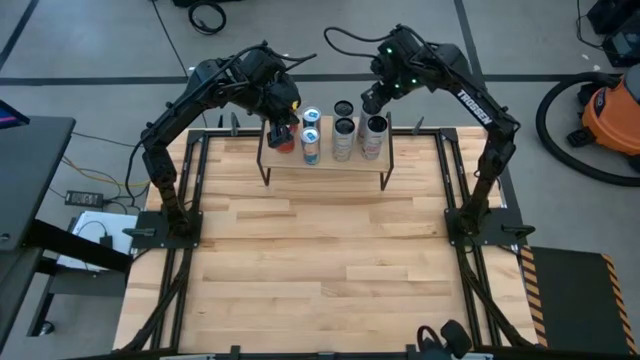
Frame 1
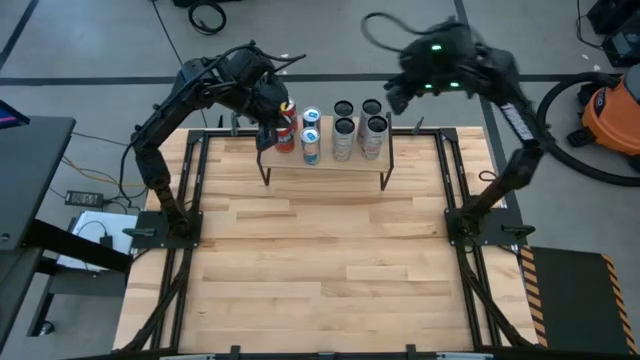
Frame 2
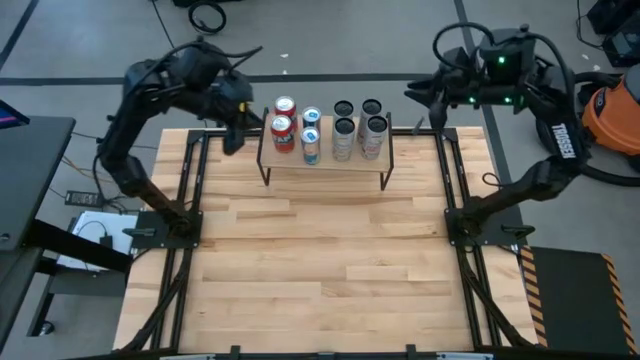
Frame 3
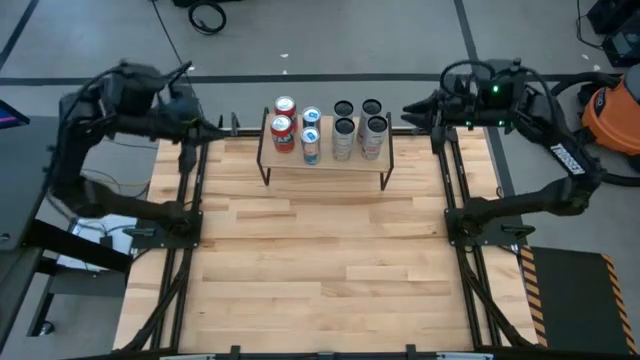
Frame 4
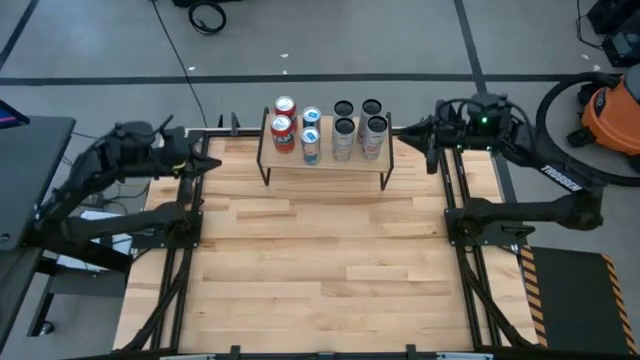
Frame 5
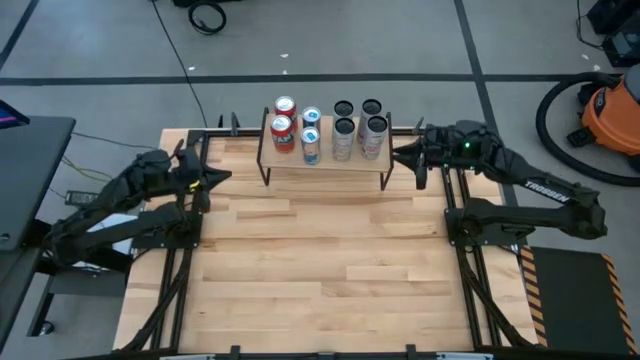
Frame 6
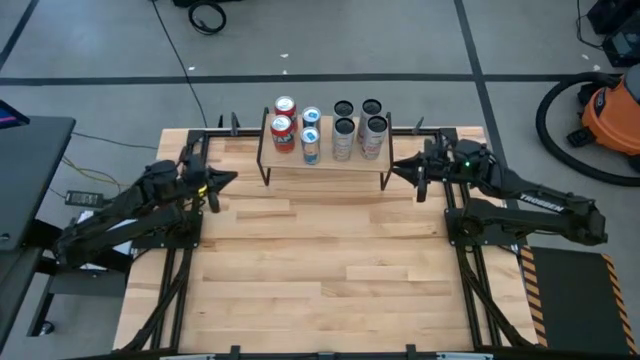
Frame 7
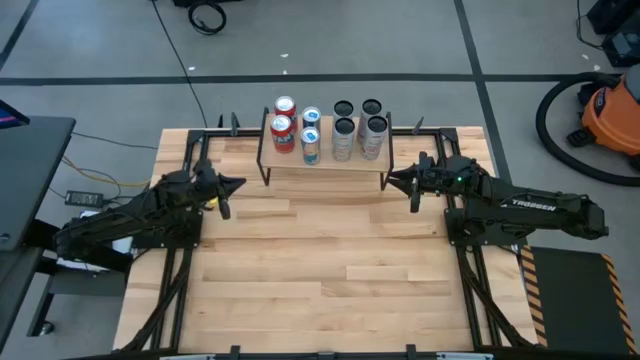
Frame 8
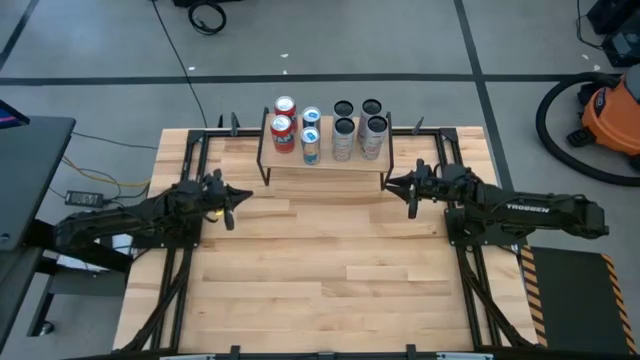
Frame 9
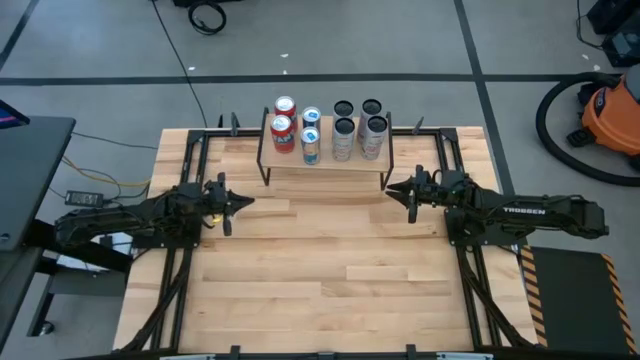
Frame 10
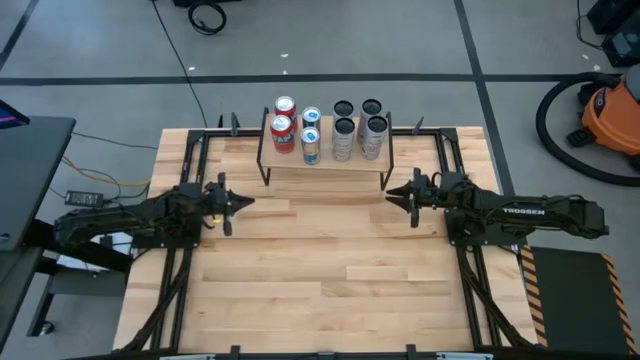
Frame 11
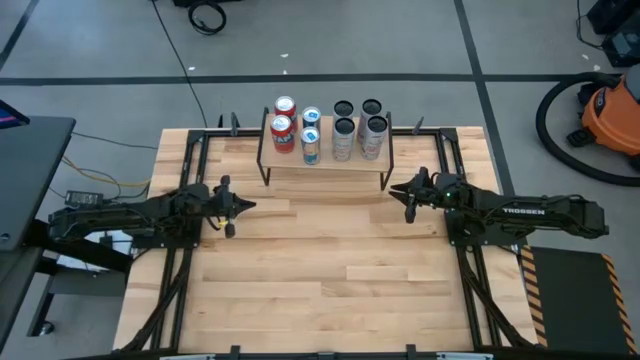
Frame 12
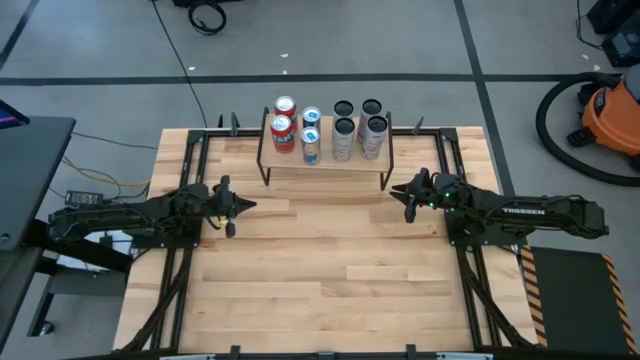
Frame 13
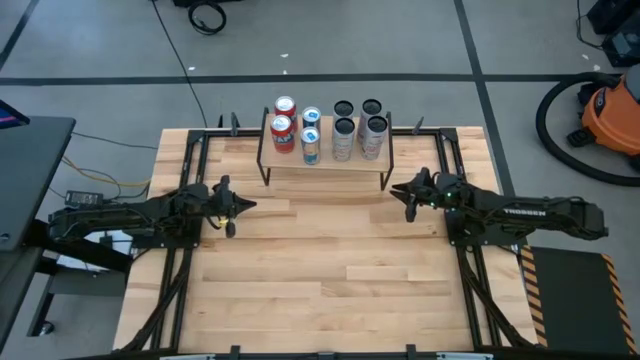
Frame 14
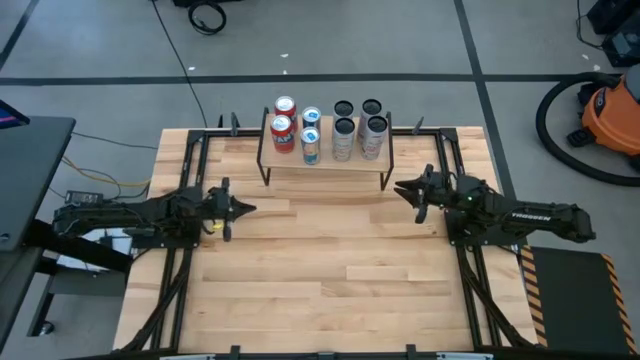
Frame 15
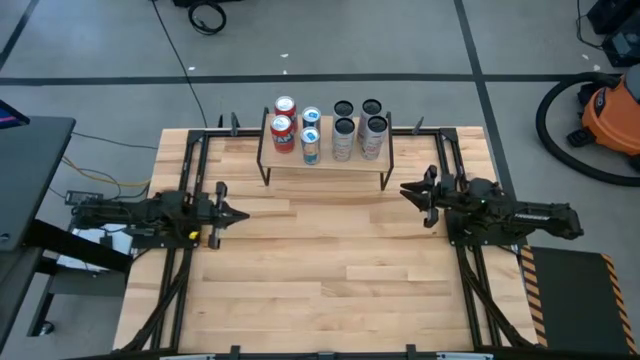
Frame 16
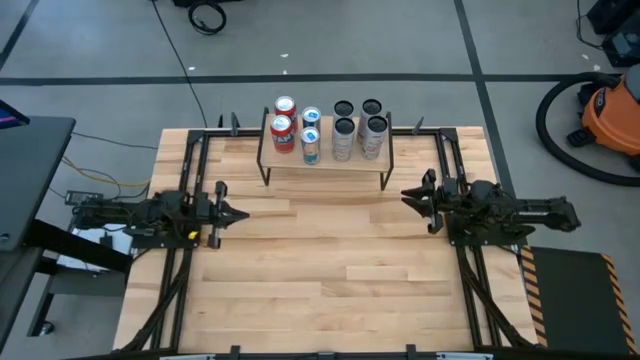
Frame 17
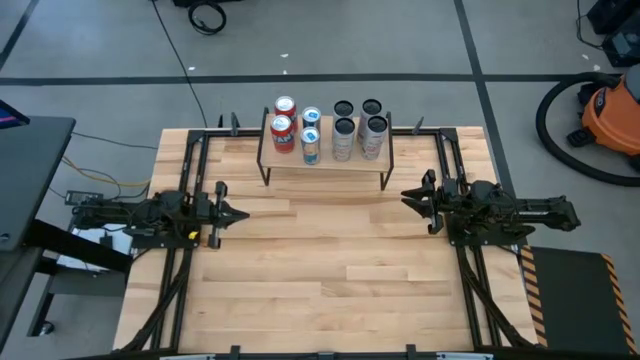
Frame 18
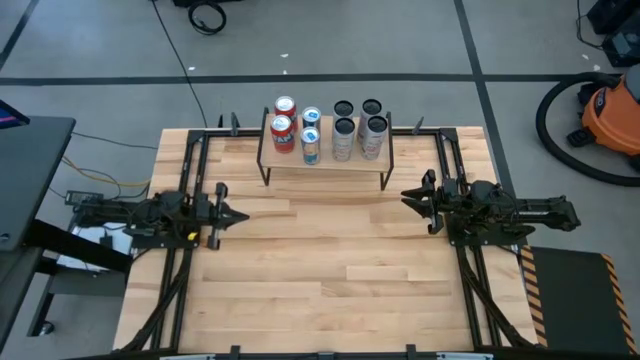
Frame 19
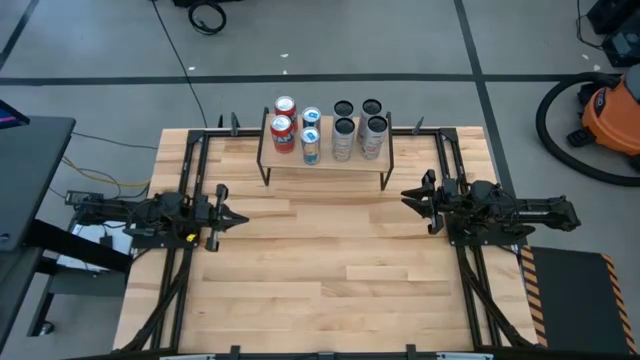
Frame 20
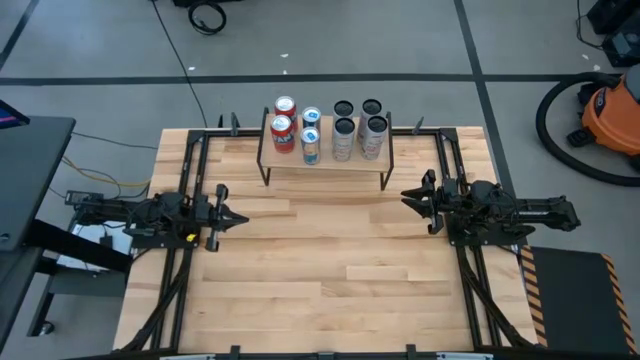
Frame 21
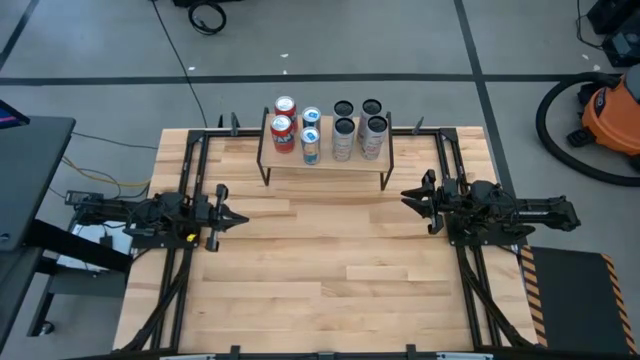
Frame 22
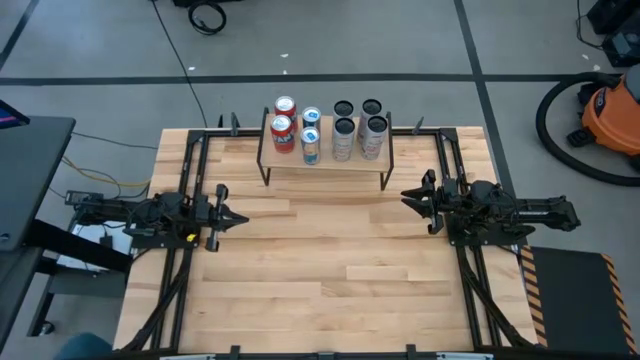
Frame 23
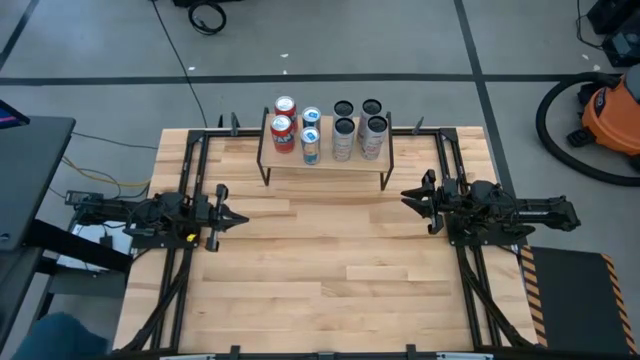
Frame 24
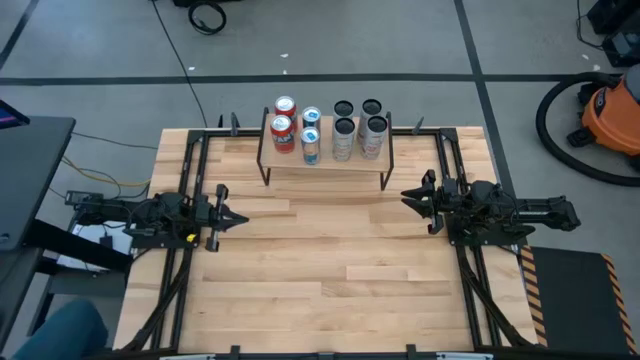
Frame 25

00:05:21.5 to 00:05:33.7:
Task: Place canned beverage on shelf
Return to Home Position
